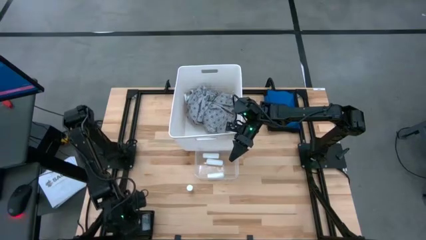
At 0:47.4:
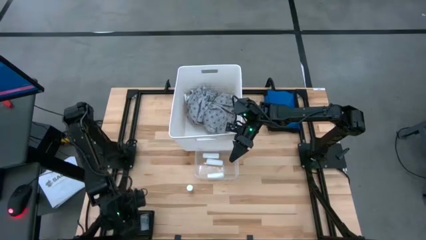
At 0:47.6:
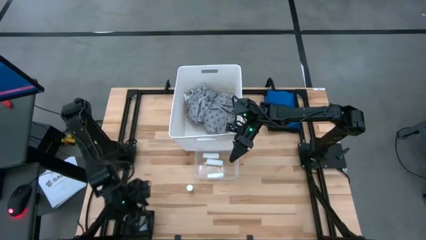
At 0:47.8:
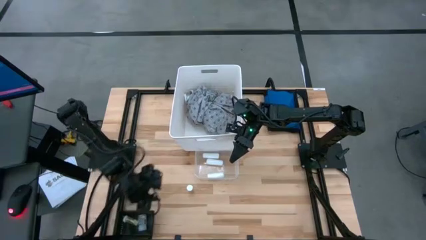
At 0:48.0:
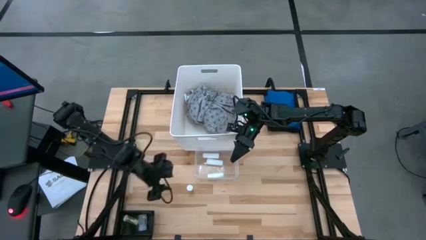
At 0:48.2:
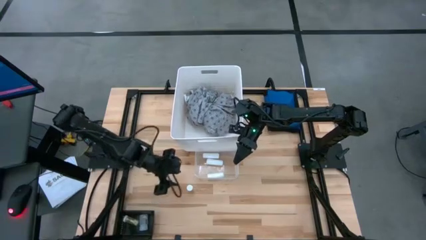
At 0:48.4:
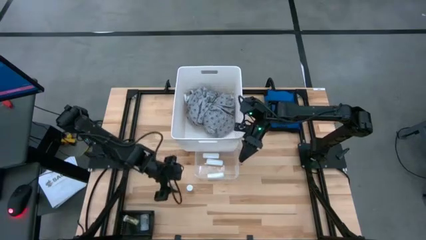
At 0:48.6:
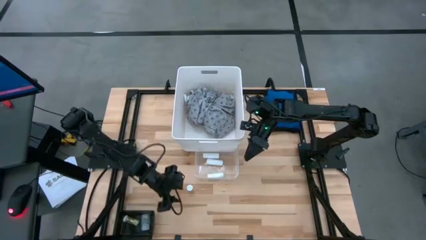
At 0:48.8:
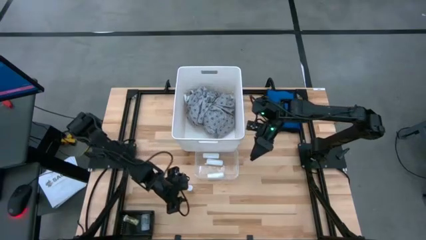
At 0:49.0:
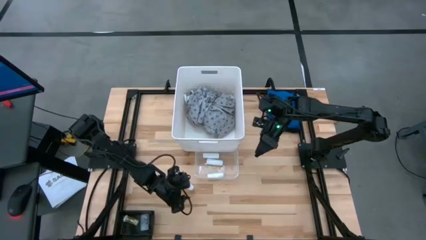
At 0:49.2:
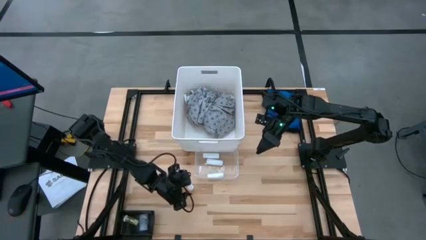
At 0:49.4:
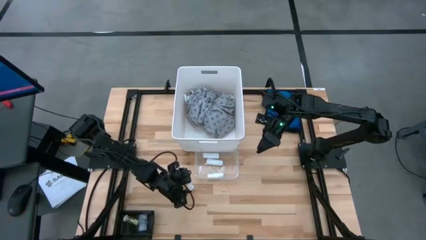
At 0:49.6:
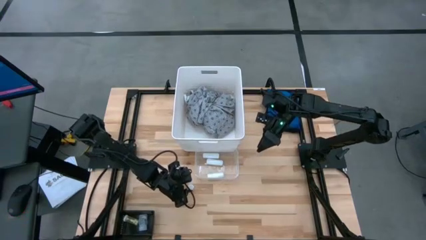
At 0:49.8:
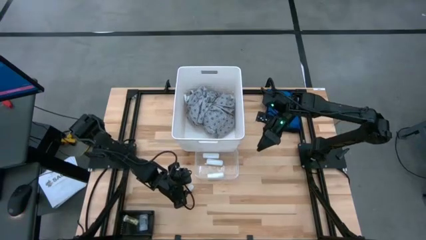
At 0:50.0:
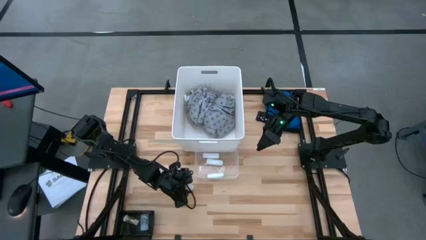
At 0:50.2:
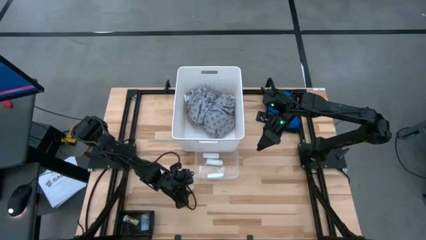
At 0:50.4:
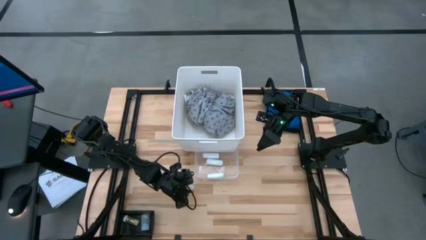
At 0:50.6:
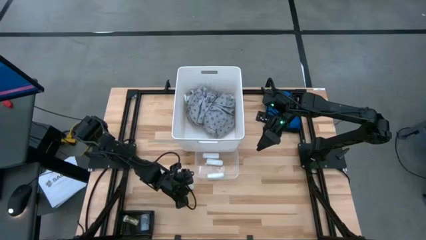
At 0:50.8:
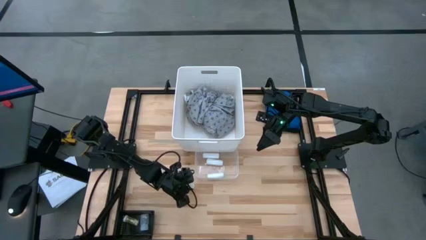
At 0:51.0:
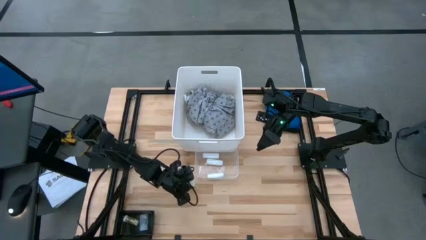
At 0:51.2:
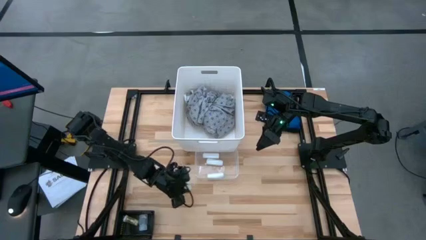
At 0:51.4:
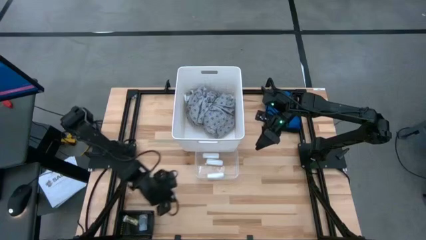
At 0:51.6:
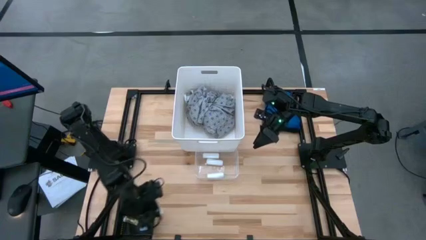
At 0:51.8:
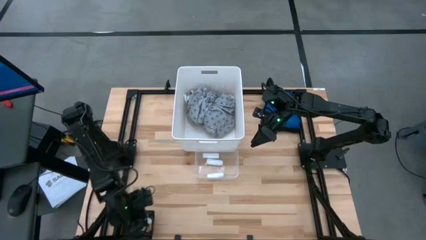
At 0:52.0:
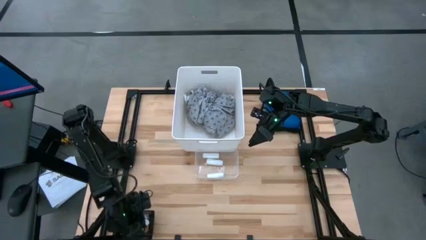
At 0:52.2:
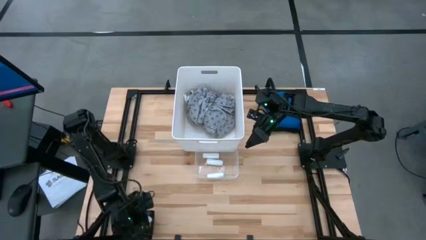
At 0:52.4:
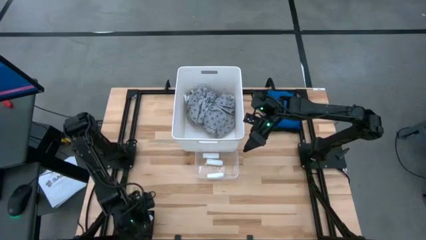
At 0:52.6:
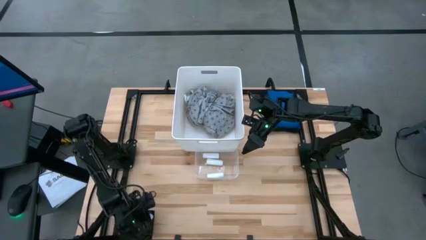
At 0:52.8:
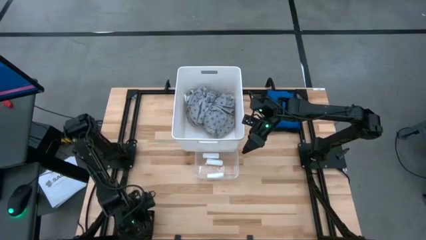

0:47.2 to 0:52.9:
Task: Pick & Place Medicine items
Put the yellow pill bottle into the black bin

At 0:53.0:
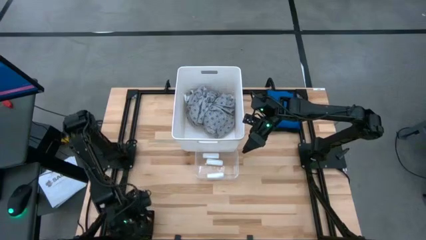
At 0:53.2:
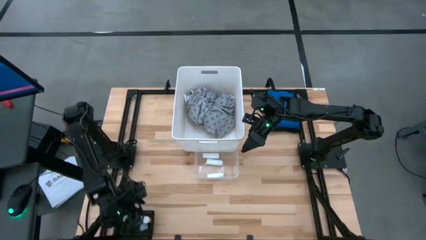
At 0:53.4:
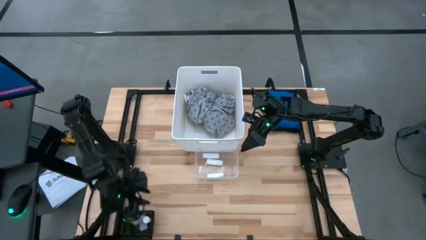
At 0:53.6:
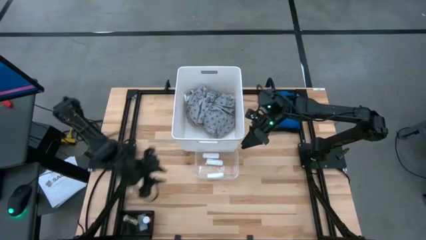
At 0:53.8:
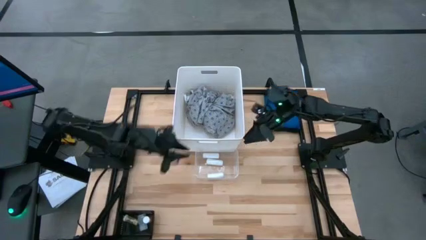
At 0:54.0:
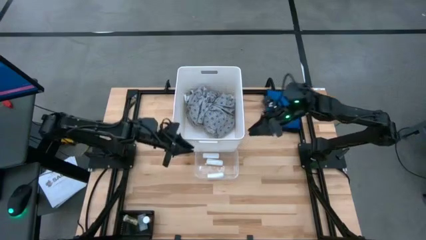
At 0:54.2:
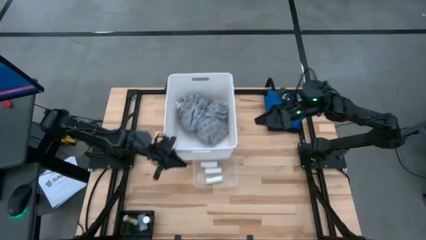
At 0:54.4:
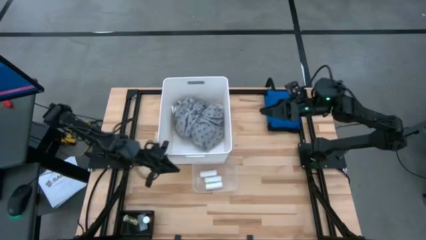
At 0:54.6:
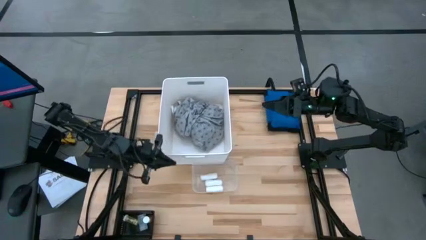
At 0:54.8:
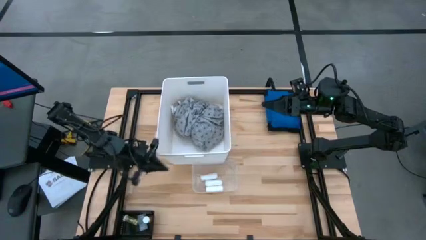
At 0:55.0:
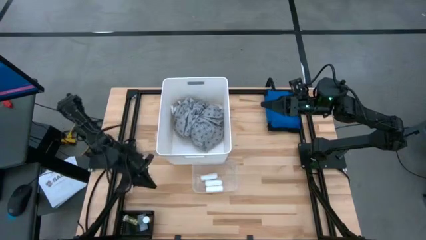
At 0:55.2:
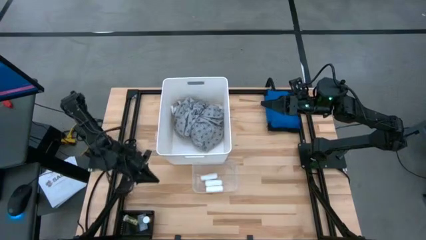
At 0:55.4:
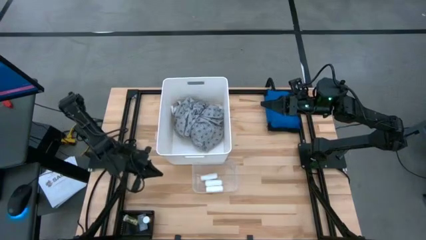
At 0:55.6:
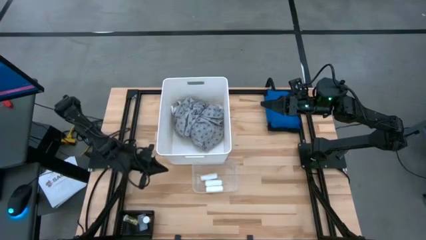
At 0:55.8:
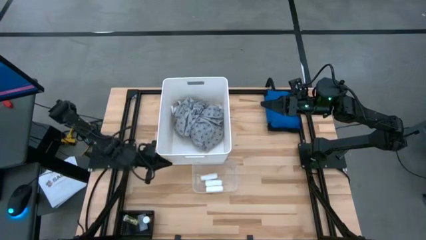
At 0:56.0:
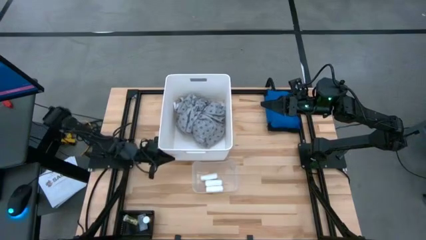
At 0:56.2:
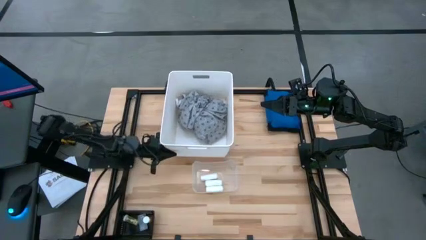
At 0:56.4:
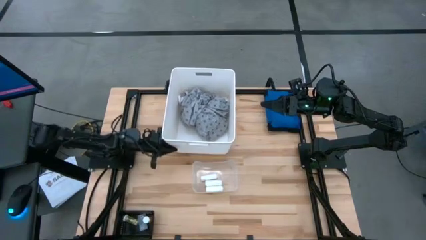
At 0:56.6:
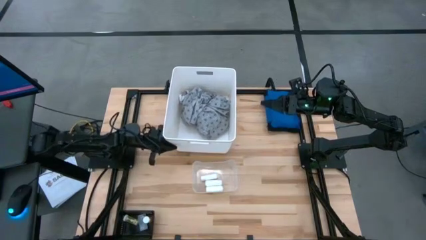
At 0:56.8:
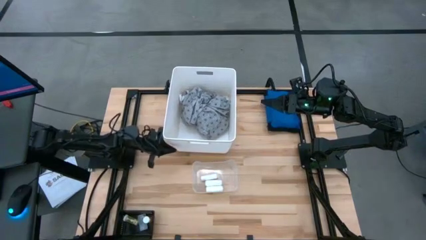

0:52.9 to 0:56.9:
Adjust the white bin

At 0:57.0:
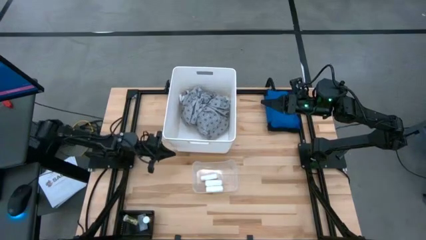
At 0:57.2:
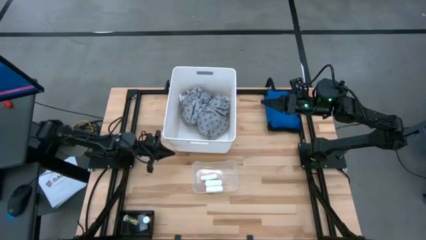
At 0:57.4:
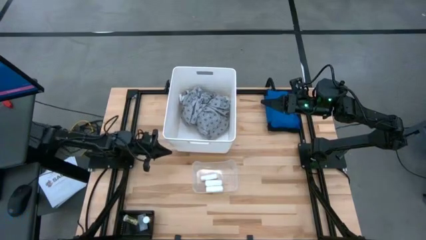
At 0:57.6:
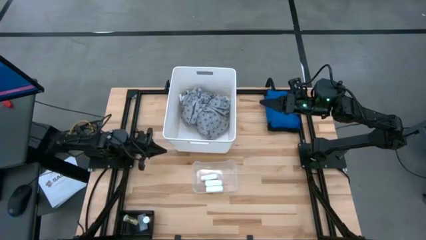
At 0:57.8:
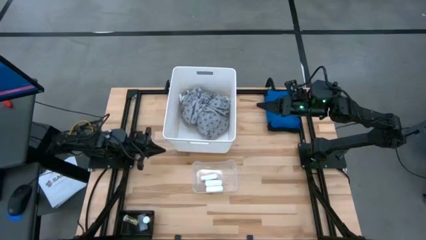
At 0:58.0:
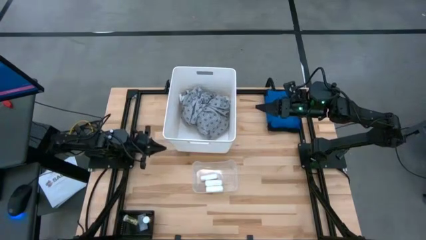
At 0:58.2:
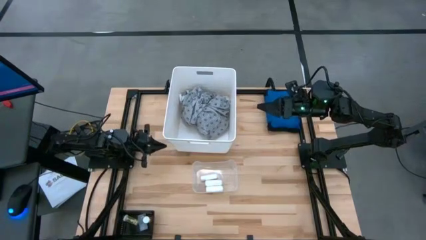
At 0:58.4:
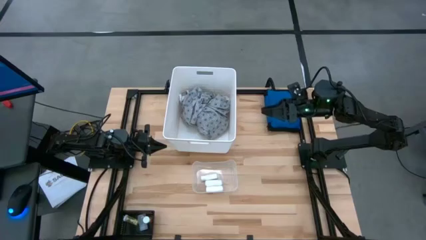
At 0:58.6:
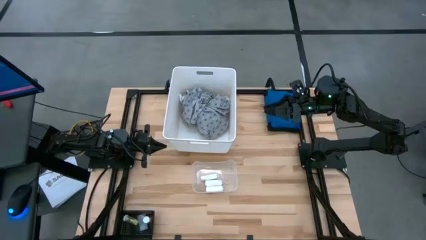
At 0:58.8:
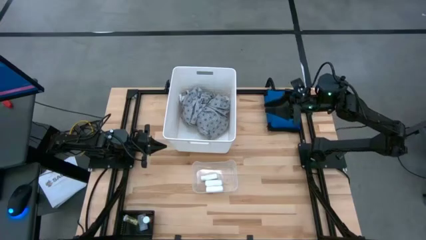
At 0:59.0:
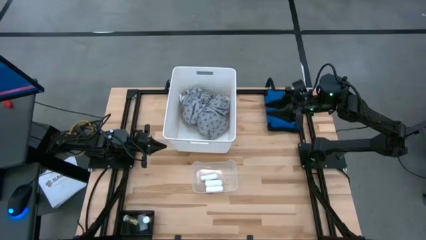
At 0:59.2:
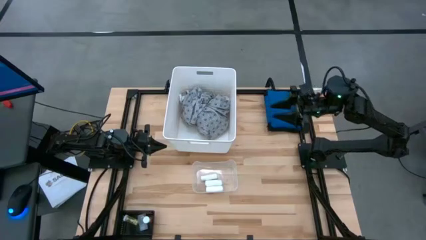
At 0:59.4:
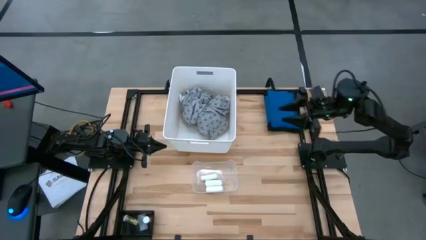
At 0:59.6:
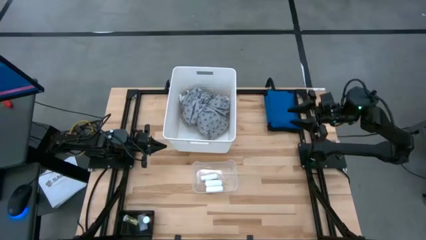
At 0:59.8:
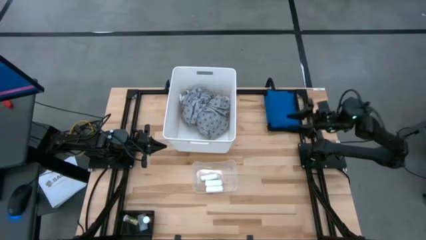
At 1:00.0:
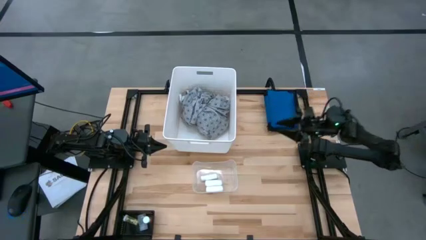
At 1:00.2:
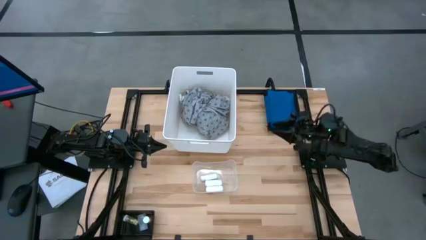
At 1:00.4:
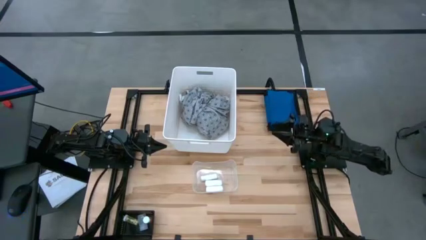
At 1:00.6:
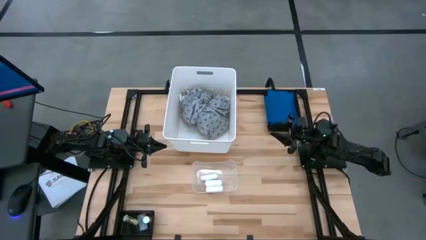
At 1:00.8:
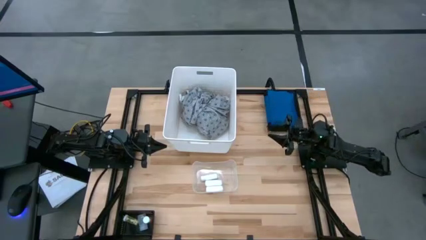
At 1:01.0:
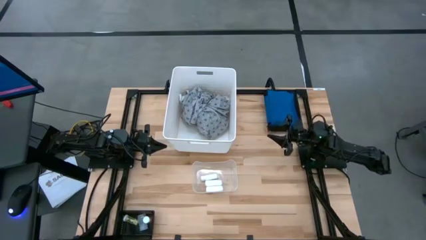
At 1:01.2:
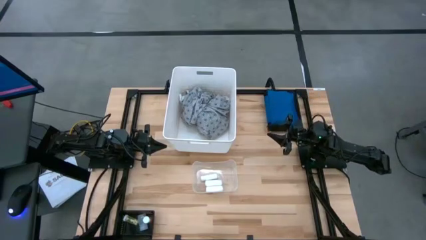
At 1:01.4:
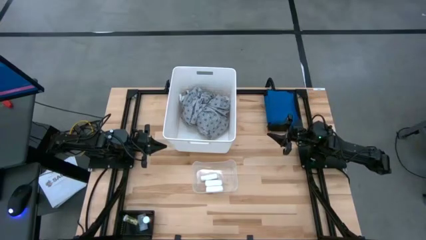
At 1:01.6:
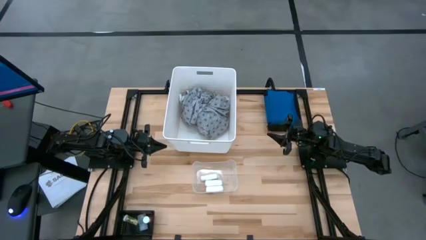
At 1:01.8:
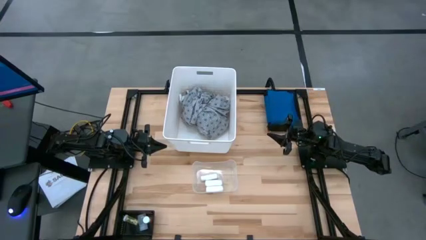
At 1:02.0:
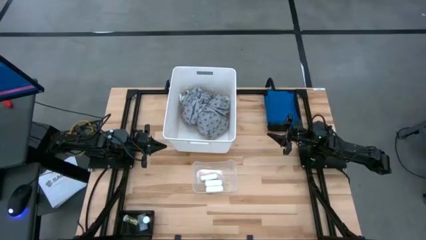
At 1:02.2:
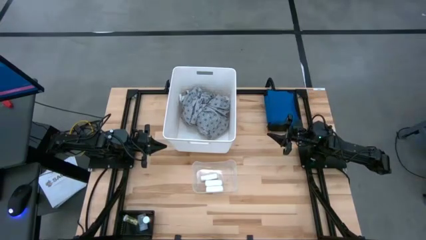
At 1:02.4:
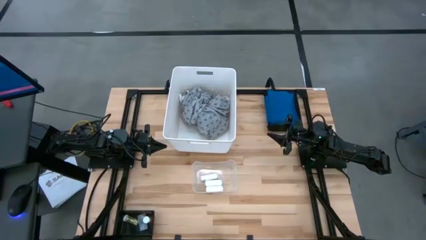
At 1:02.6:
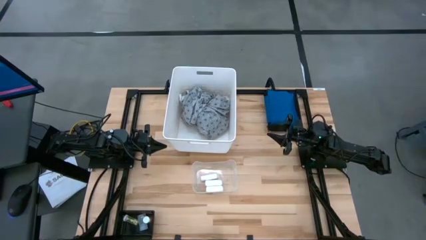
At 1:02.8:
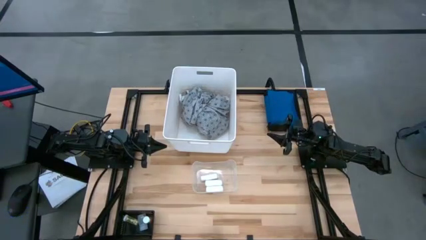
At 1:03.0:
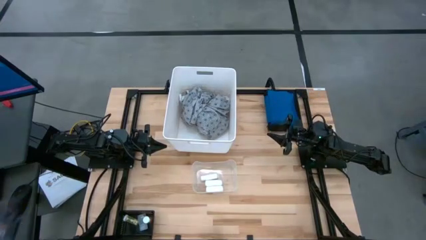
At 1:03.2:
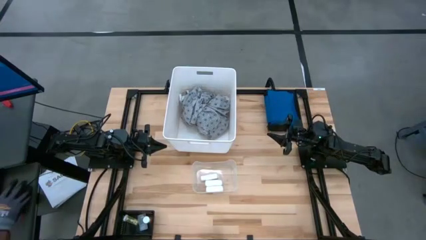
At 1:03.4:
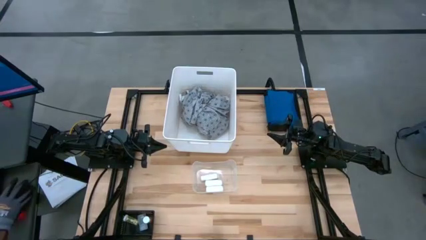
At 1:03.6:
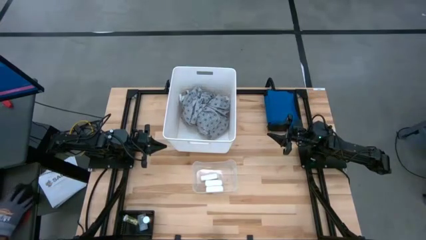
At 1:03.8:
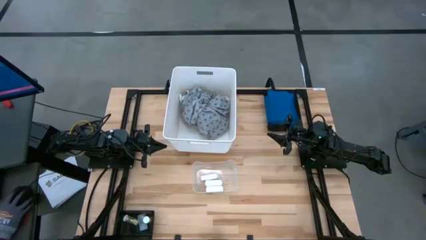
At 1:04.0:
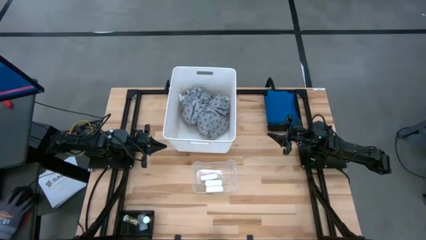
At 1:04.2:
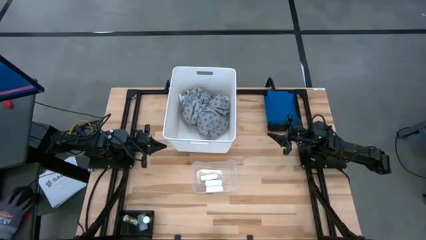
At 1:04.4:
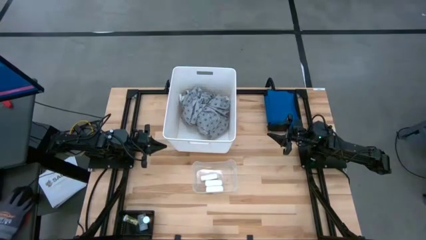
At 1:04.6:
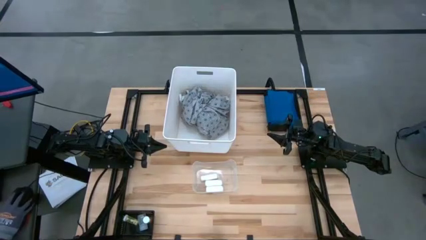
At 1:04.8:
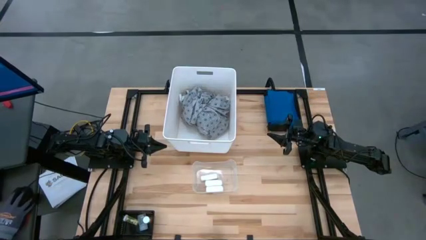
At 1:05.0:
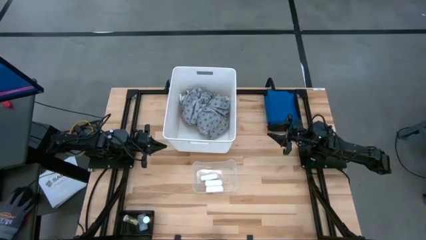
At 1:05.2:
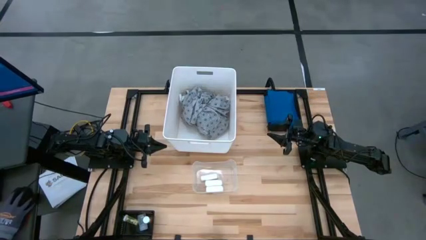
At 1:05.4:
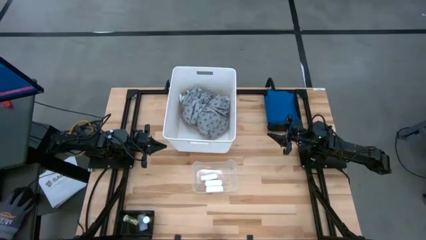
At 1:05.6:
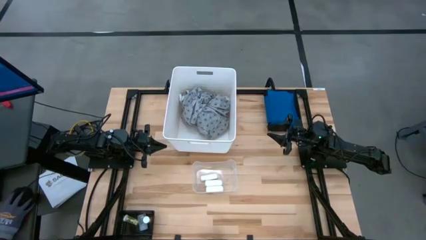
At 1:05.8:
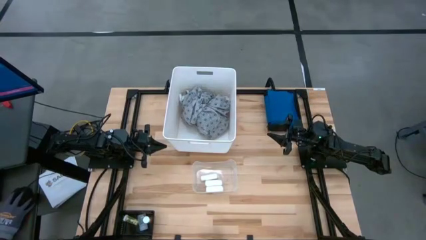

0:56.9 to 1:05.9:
Return to Home Position
